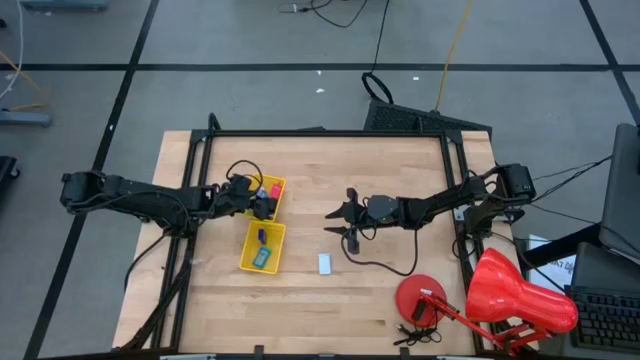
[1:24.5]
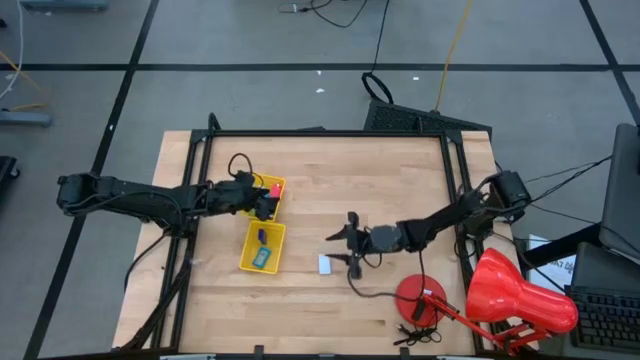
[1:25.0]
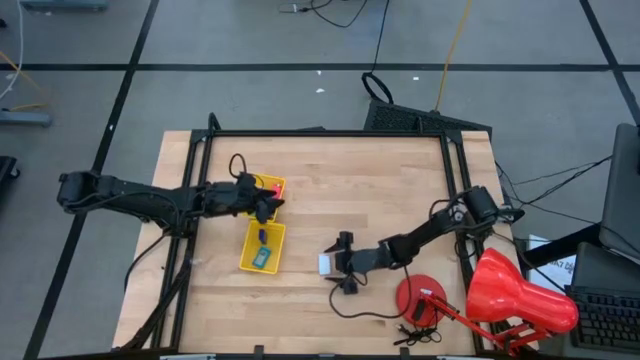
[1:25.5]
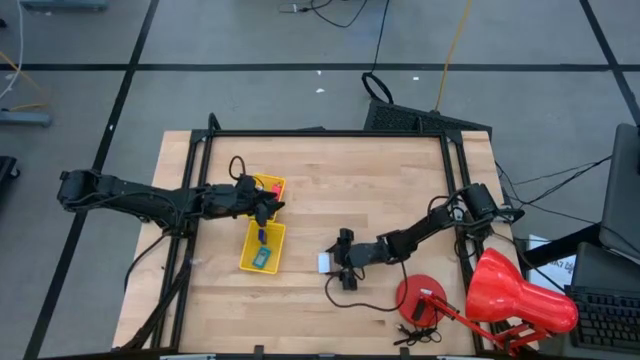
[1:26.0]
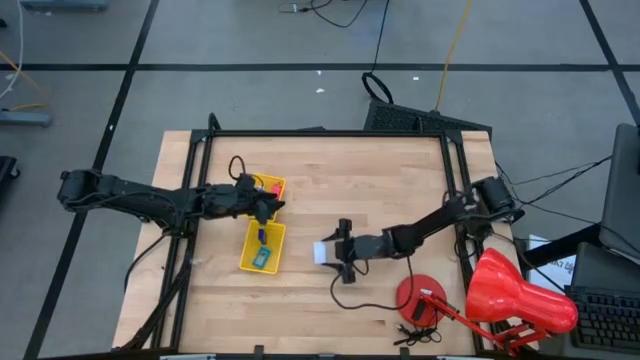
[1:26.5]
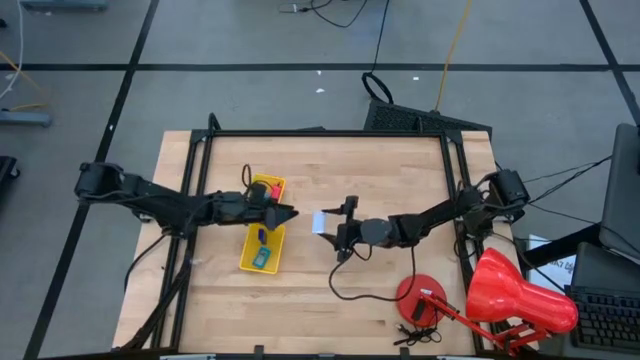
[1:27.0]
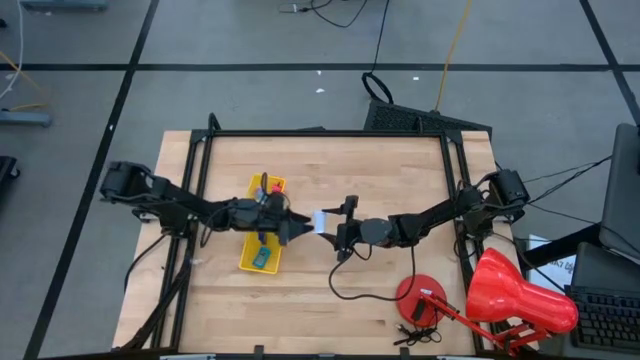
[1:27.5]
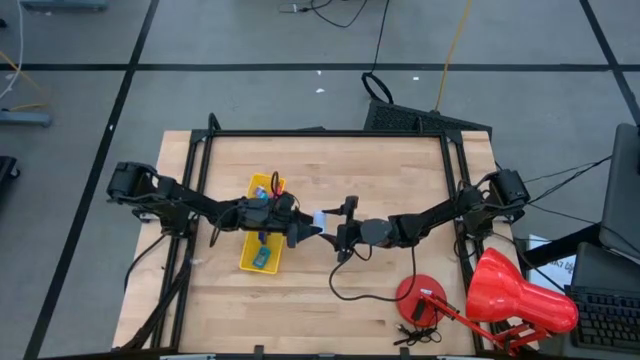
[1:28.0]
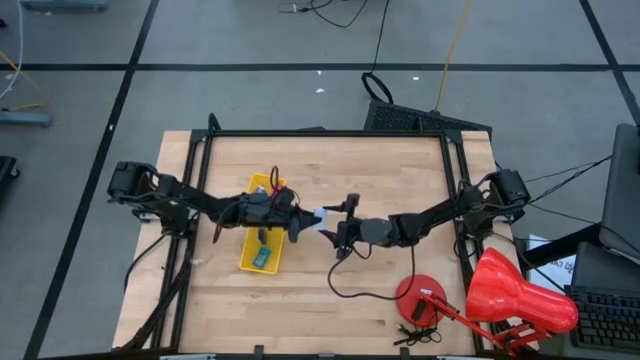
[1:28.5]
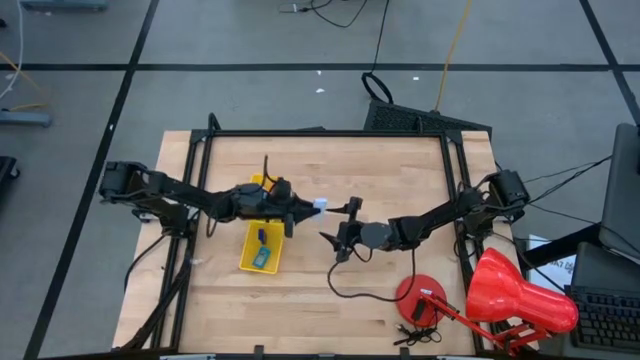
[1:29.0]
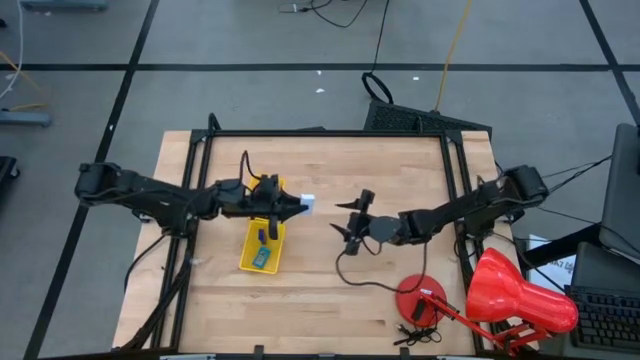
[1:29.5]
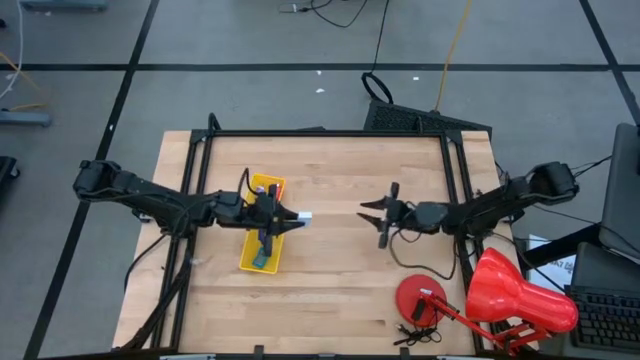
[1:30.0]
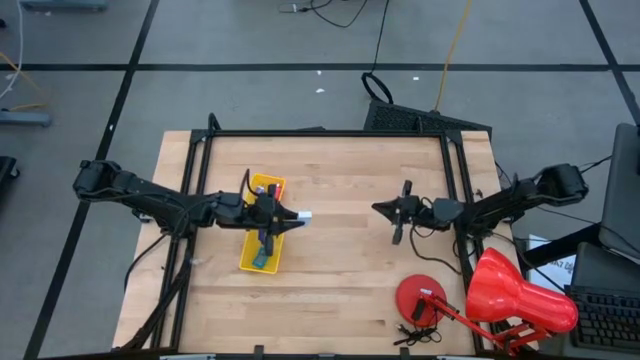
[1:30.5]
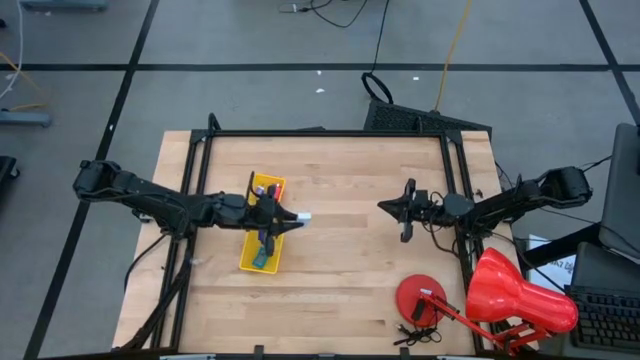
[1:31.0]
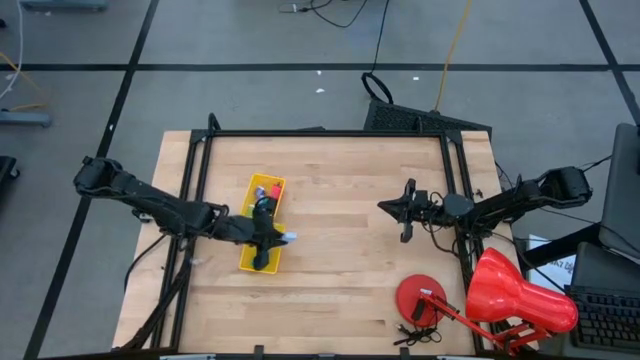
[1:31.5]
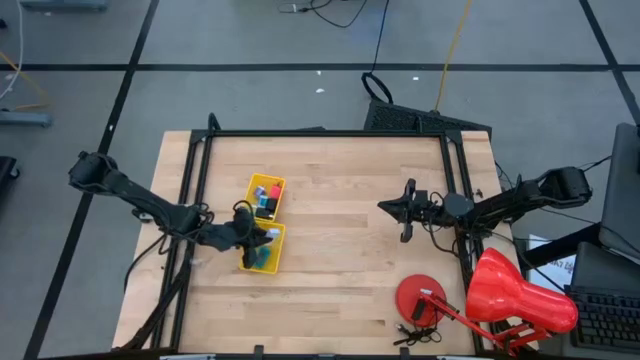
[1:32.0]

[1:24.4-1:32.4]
Task: Pick & Place Office items
Put the white timer into the bottom yellow basket

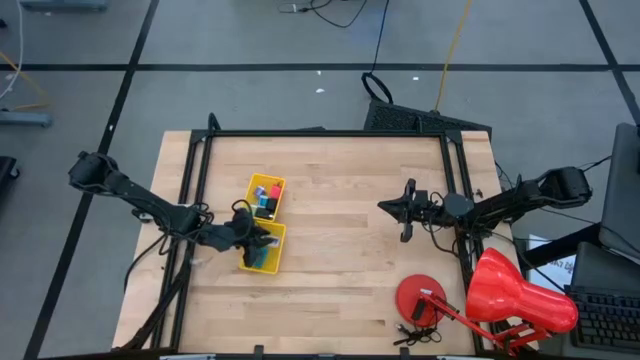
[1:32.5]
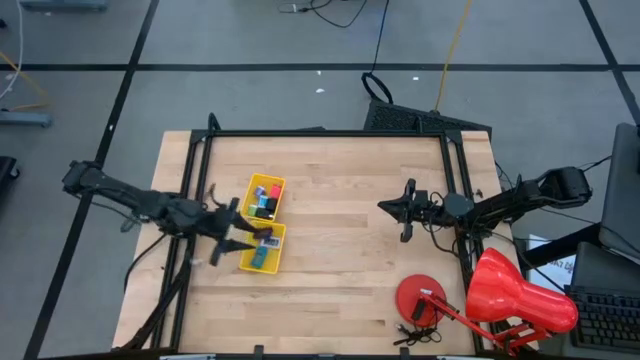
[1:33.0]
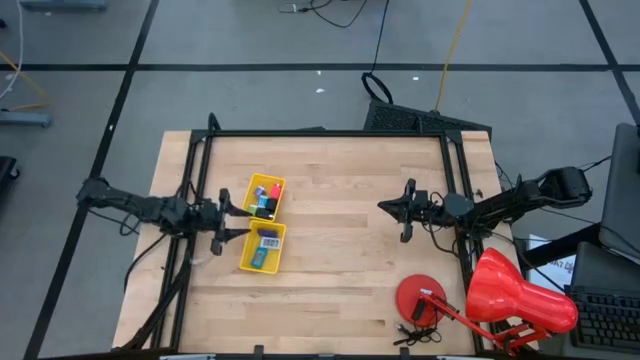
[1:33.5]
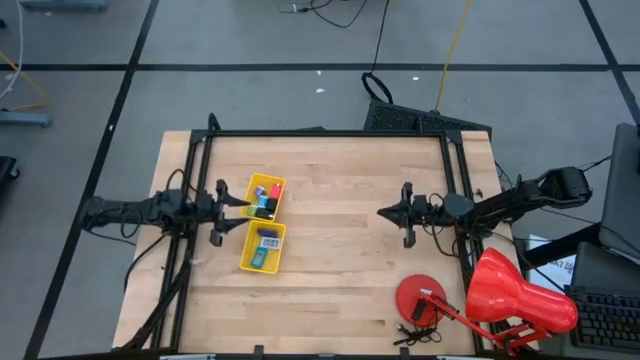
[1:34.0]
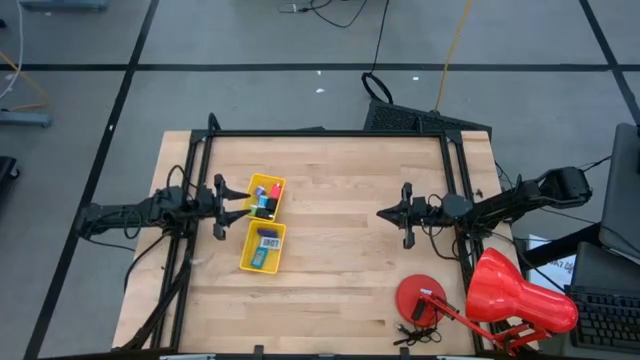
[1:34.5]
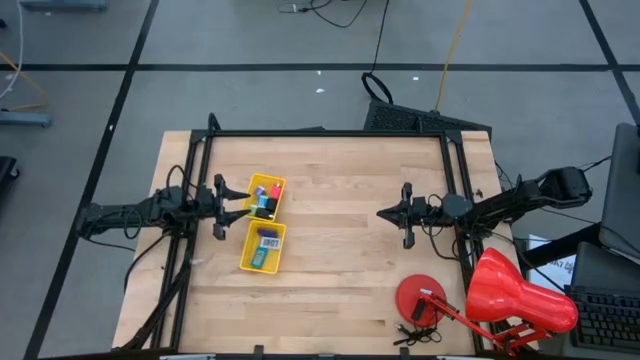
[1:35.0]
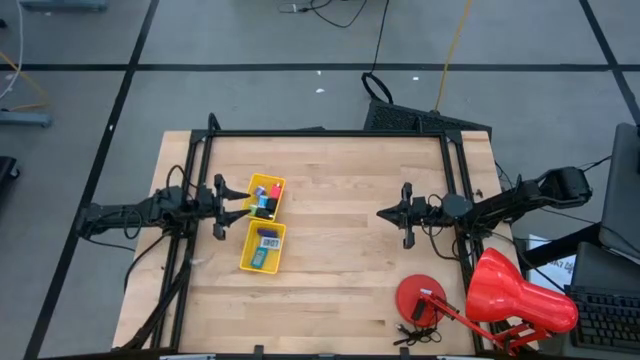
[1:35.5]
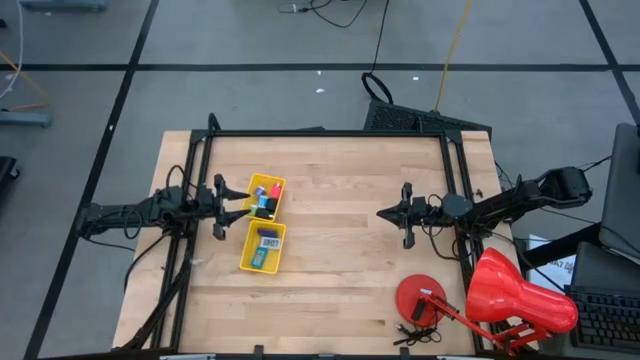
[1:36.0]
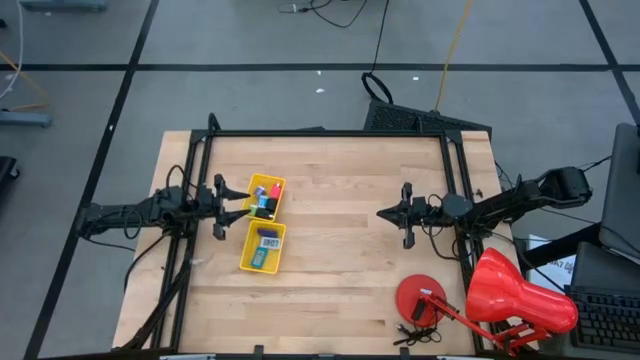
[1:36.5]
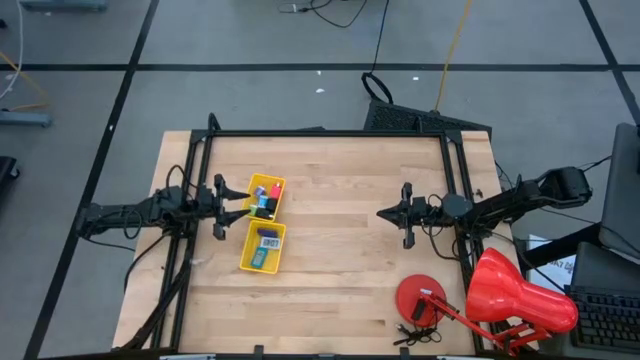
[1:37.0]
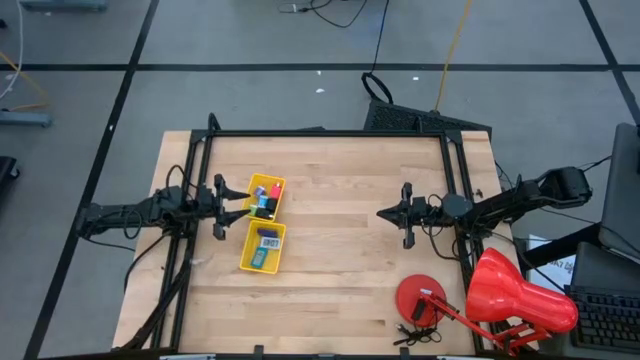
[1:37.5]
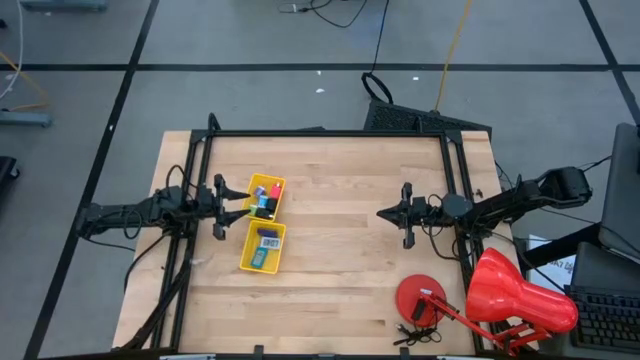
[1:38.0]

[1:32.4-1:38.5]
Return to Home Position

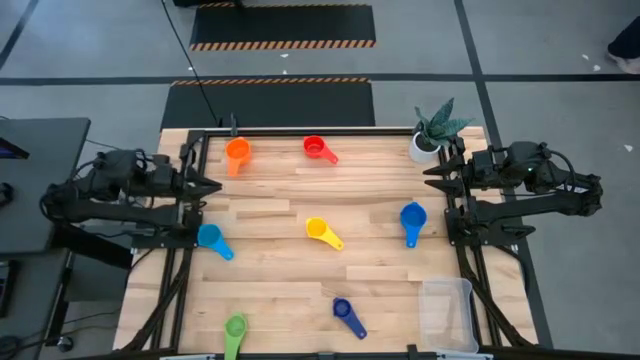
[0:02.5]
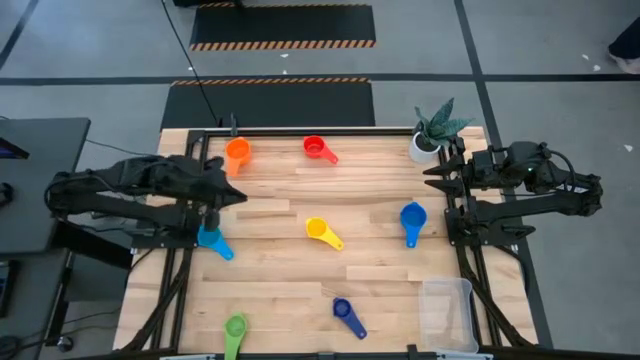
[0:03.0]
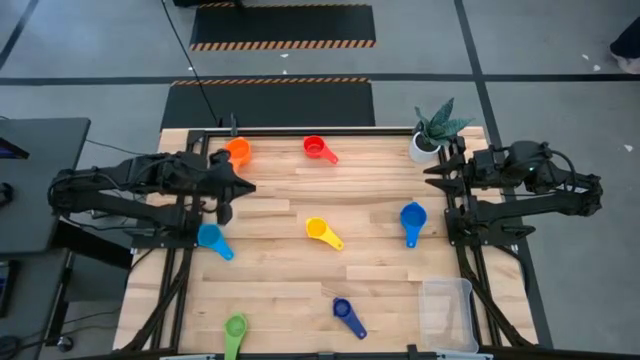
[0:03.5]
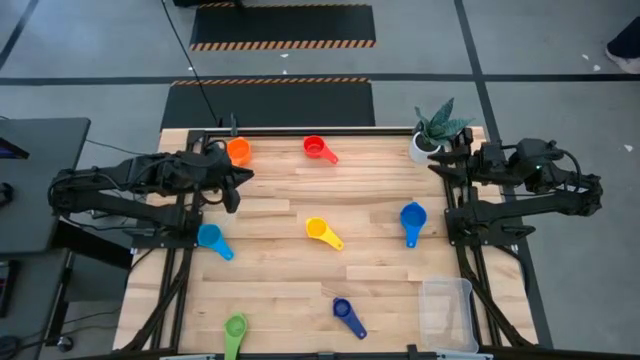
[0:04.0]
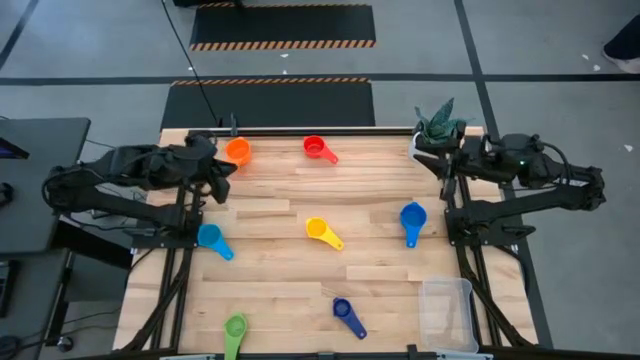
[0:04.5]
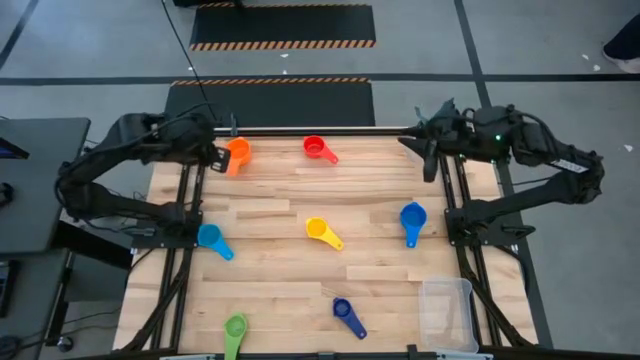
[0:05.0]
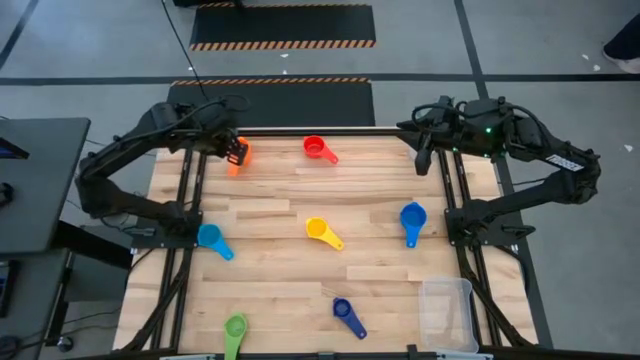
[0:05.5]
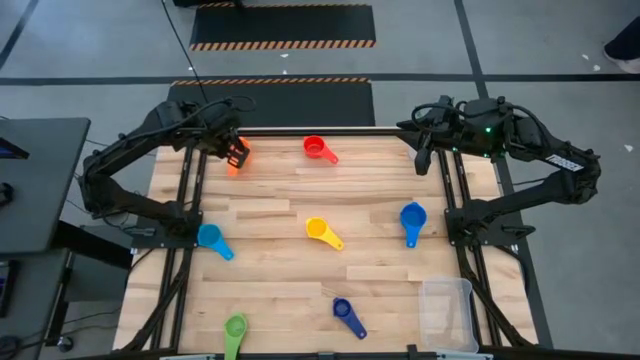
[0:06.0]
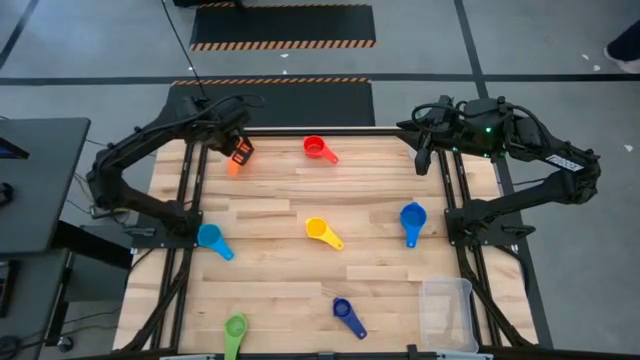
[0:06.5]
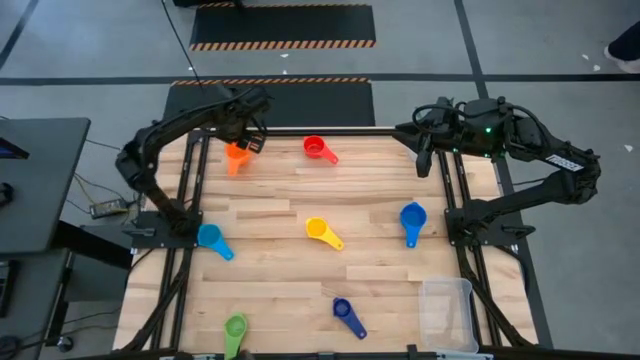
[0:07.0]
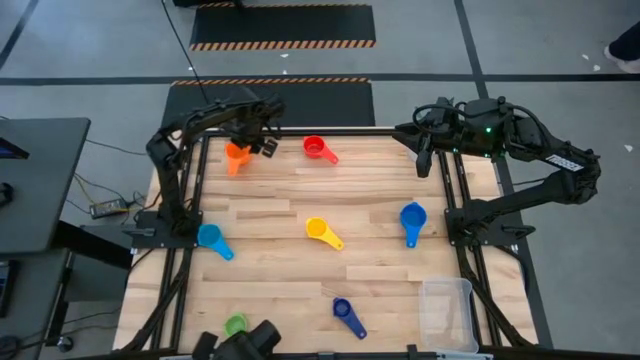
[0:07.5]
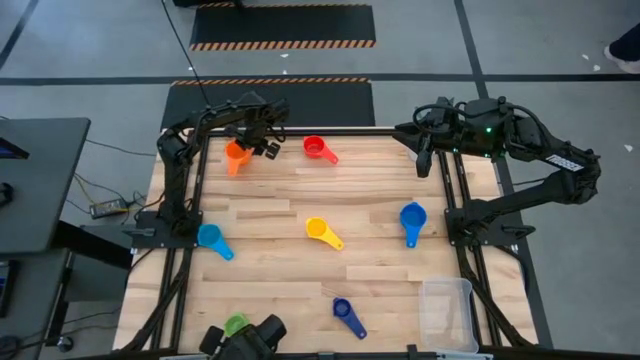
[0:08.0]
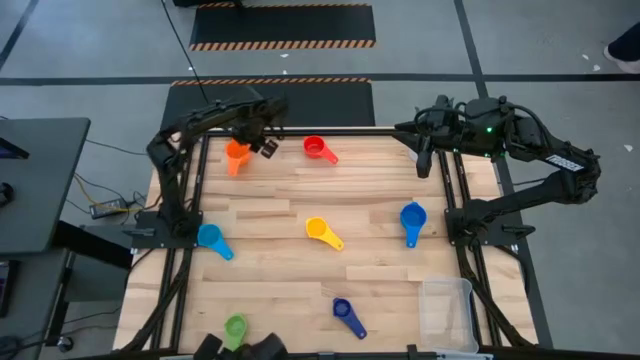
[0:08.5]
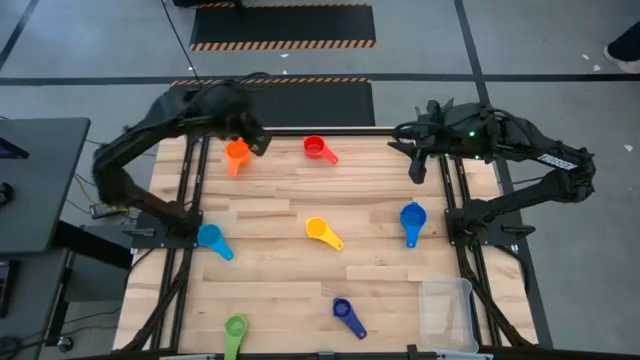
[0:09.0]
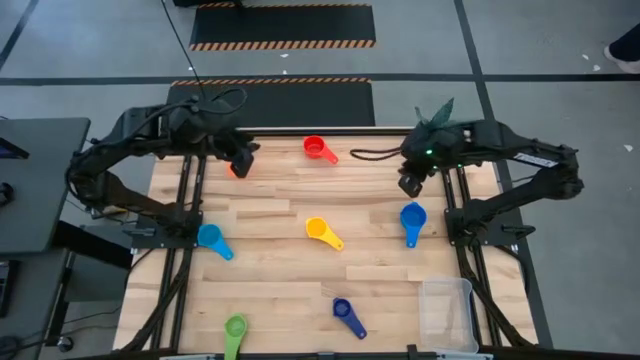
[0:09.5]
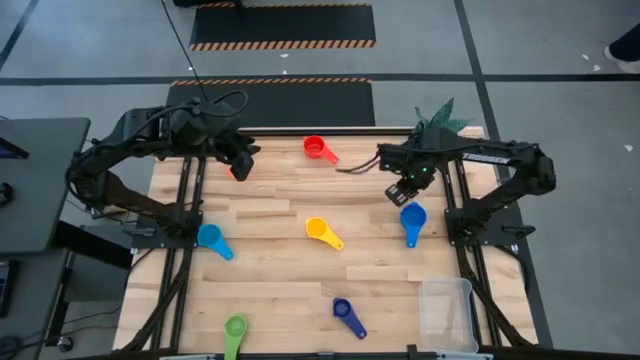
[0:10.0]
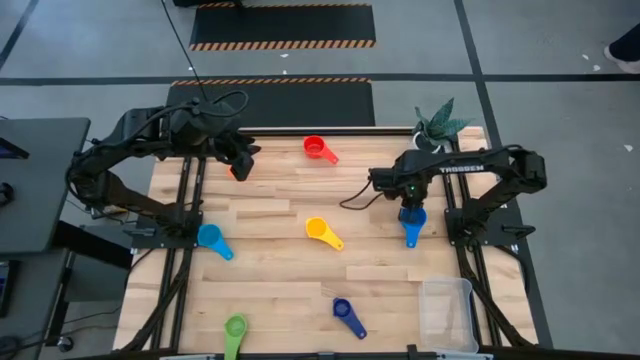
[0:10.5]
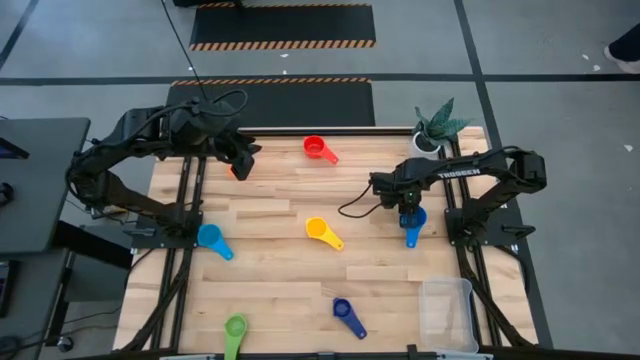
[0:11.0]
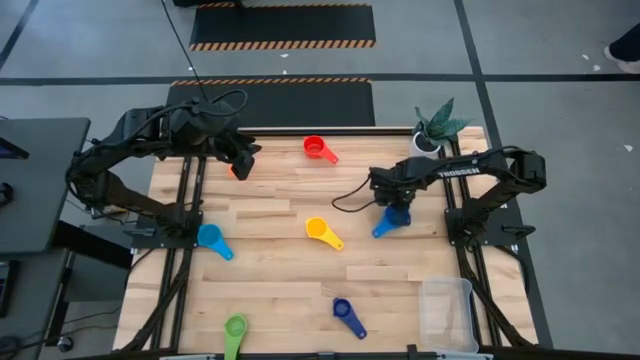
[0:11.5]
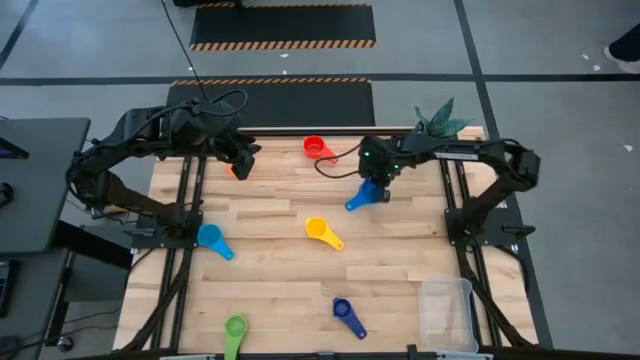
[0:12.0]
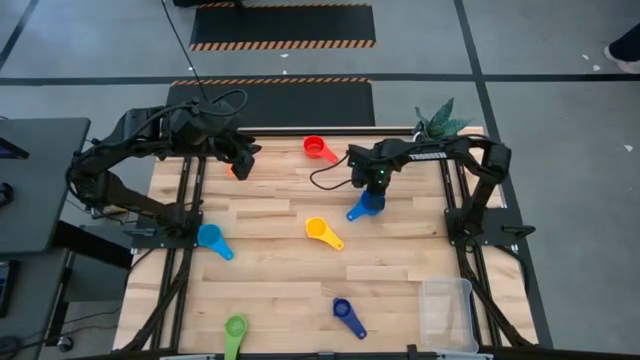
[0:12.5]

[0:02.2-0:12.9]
Task: Nest measuring cups in basket
Move the blue measuring cup to the center of the table
